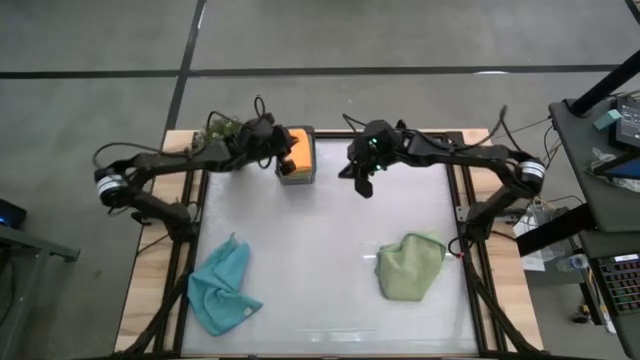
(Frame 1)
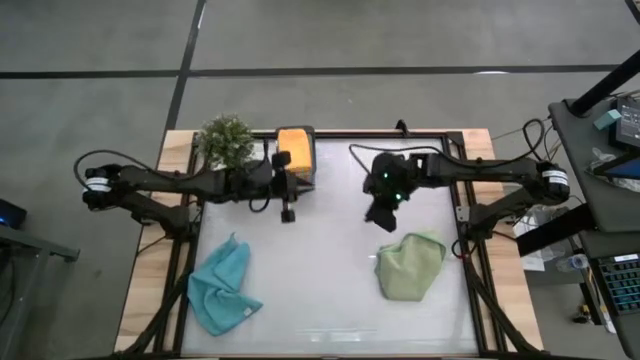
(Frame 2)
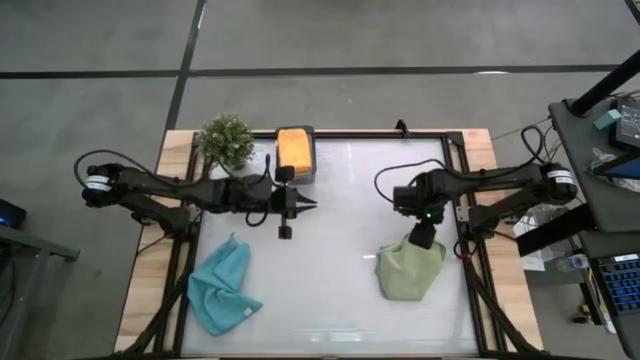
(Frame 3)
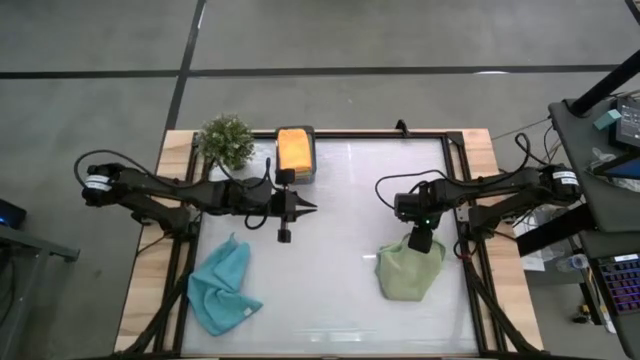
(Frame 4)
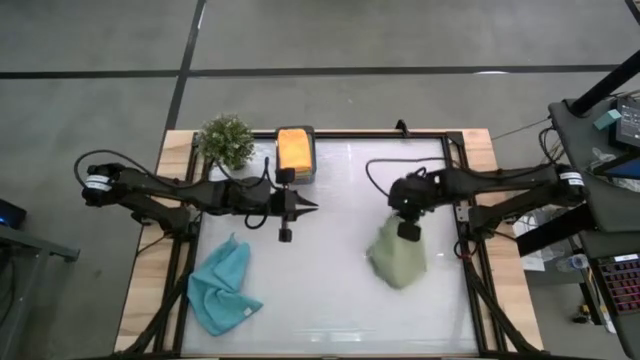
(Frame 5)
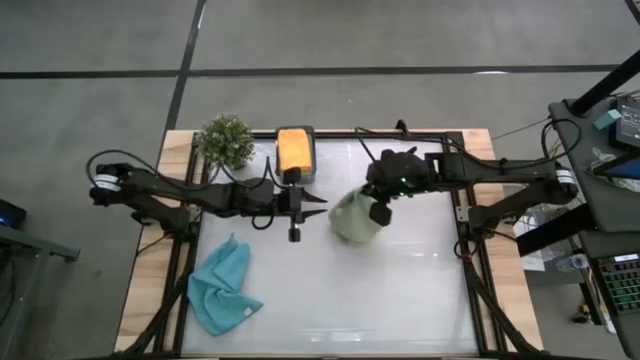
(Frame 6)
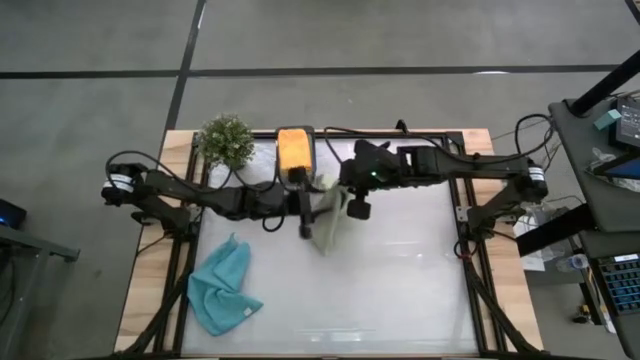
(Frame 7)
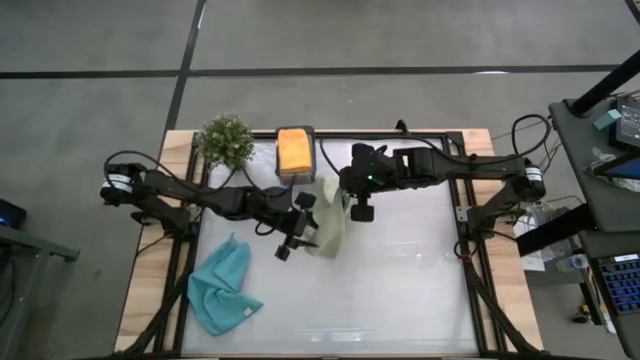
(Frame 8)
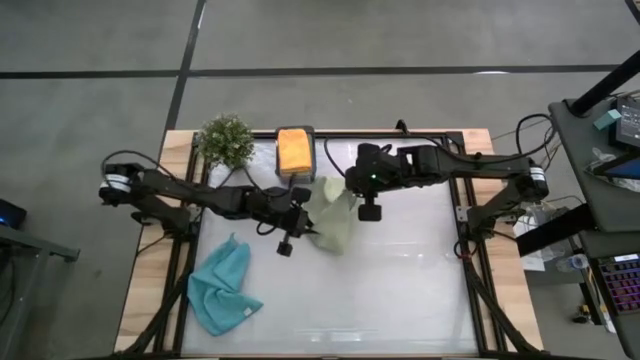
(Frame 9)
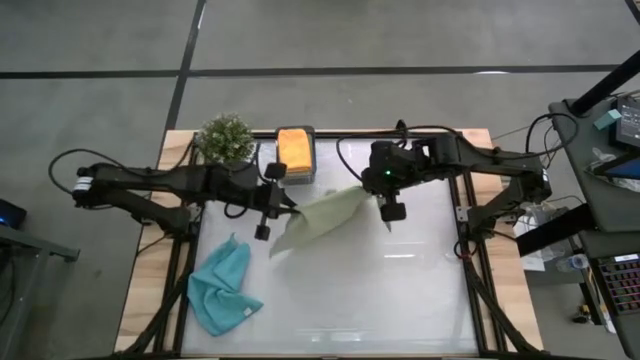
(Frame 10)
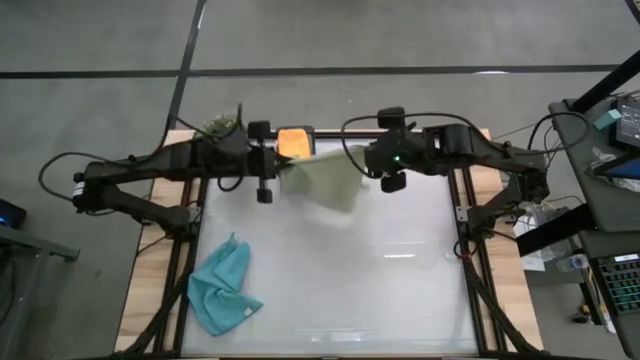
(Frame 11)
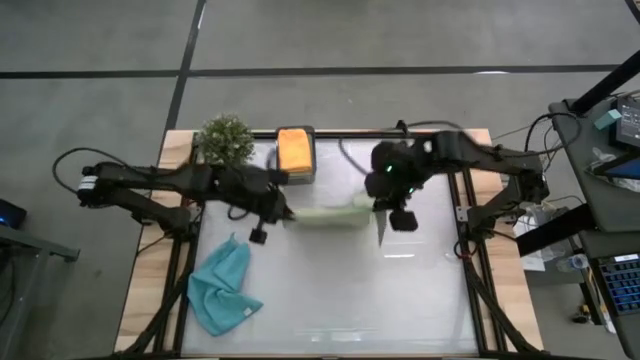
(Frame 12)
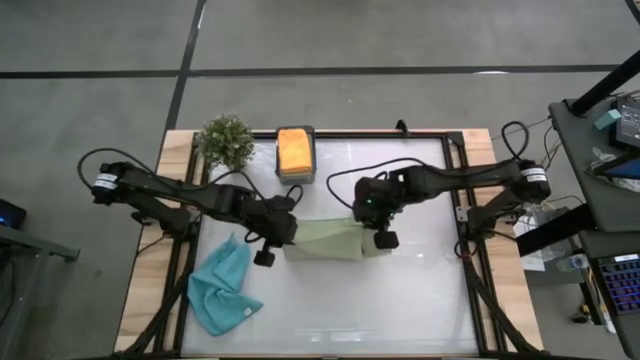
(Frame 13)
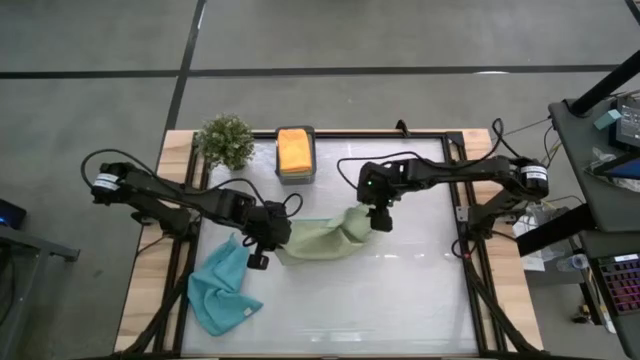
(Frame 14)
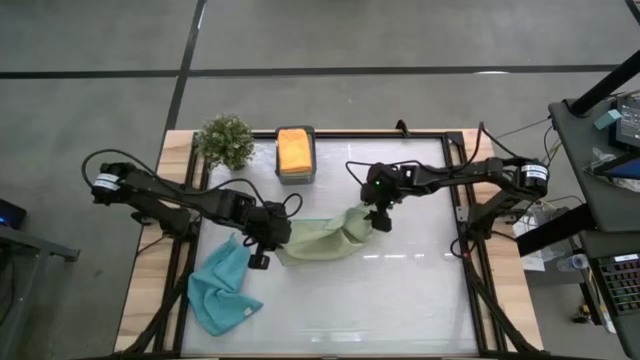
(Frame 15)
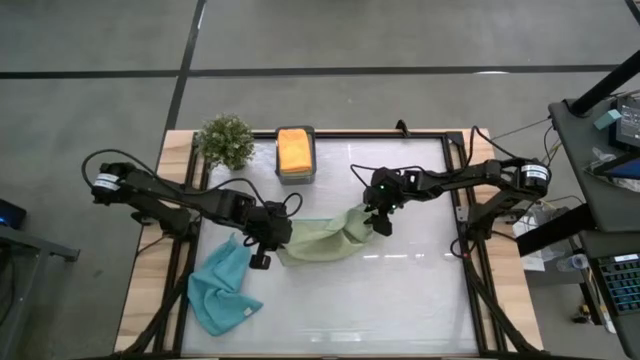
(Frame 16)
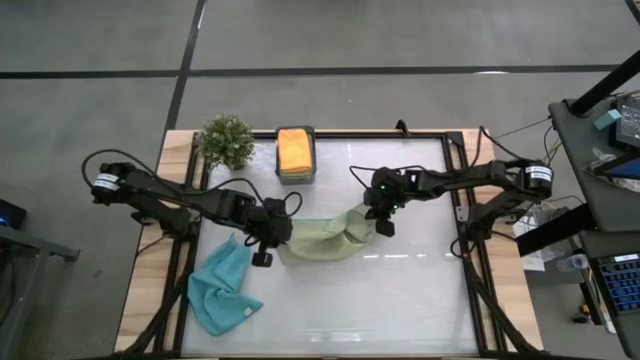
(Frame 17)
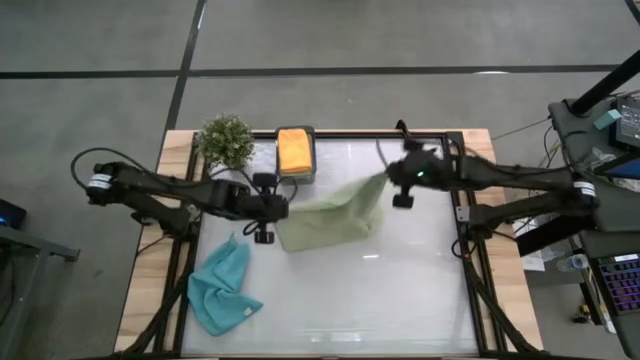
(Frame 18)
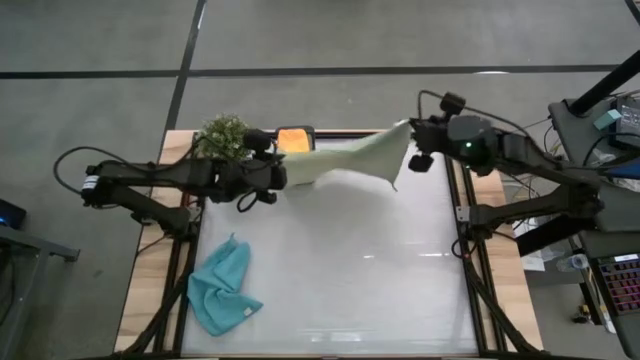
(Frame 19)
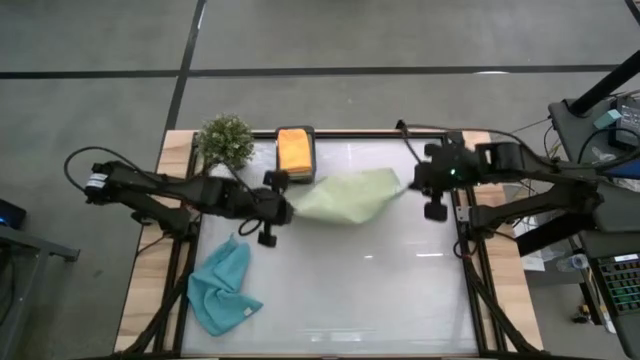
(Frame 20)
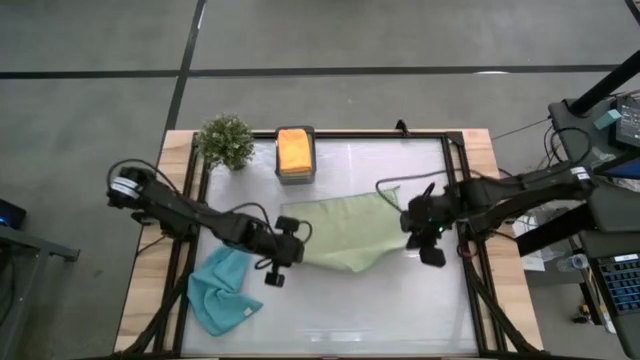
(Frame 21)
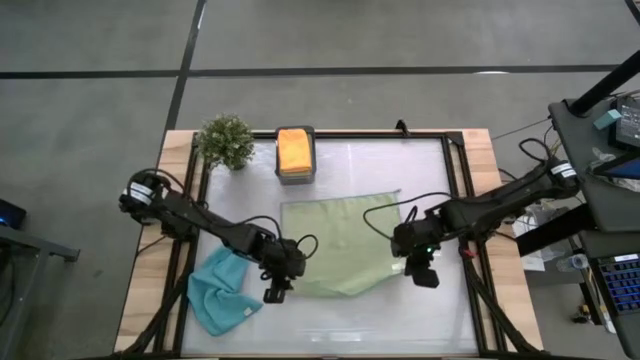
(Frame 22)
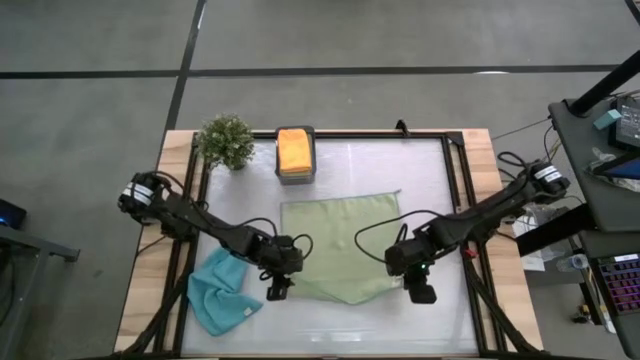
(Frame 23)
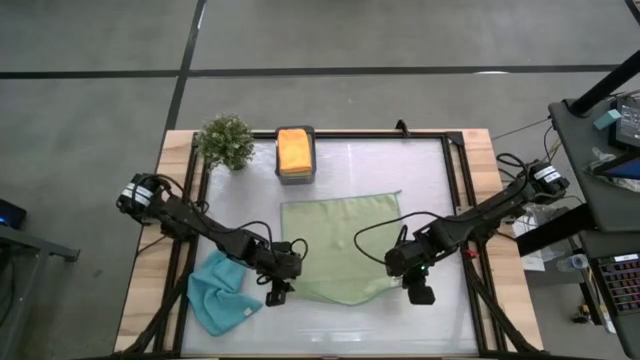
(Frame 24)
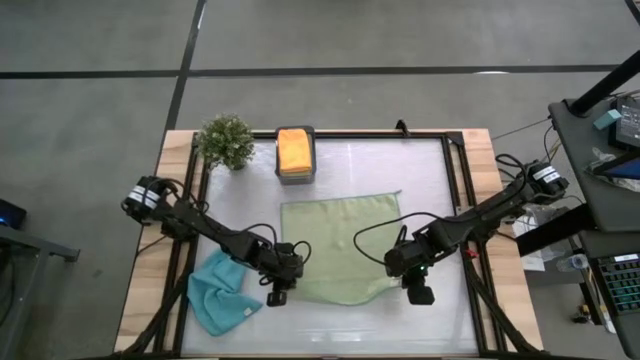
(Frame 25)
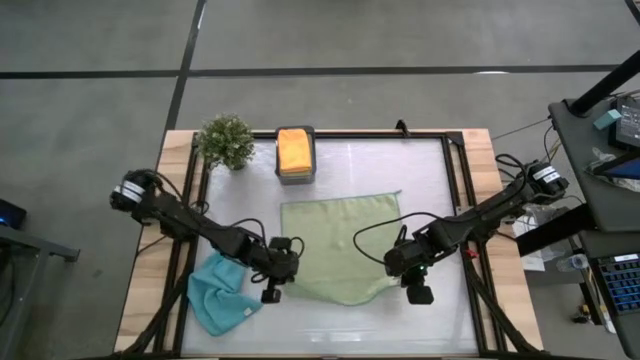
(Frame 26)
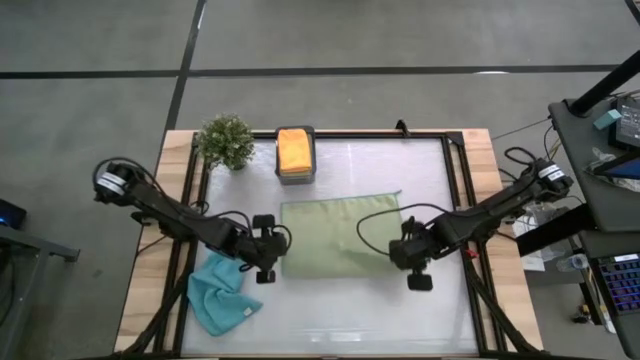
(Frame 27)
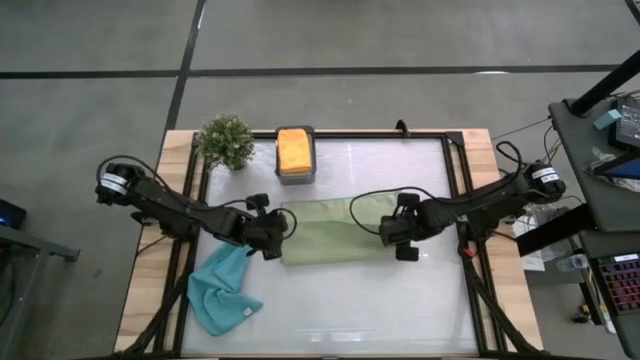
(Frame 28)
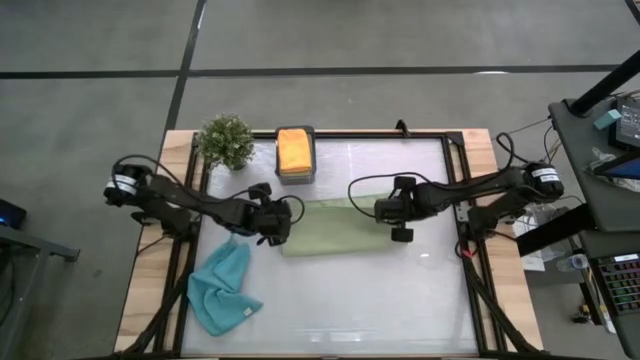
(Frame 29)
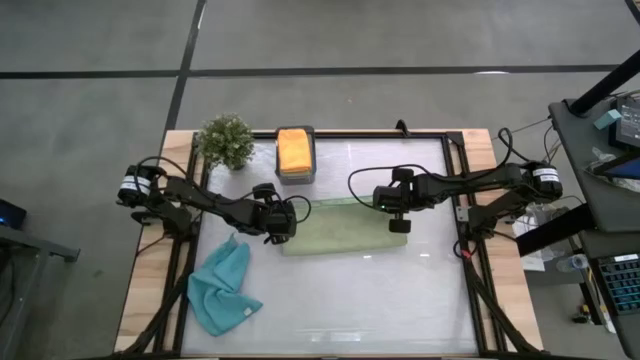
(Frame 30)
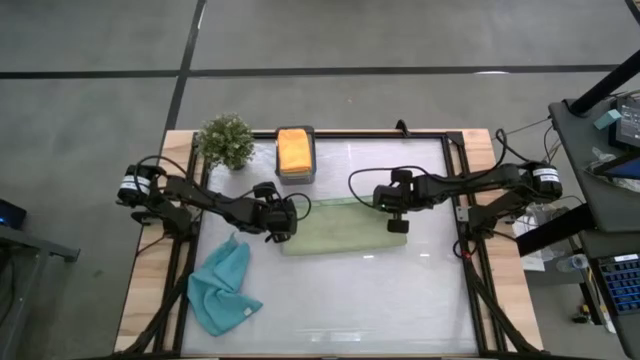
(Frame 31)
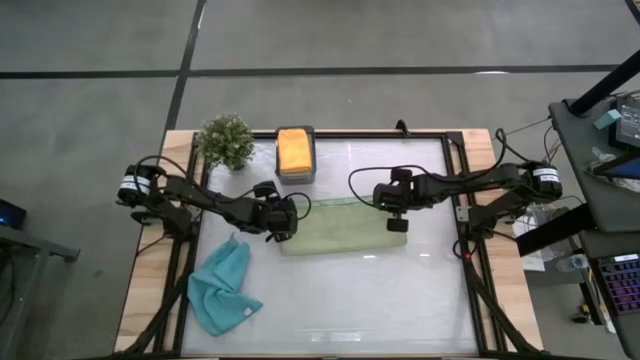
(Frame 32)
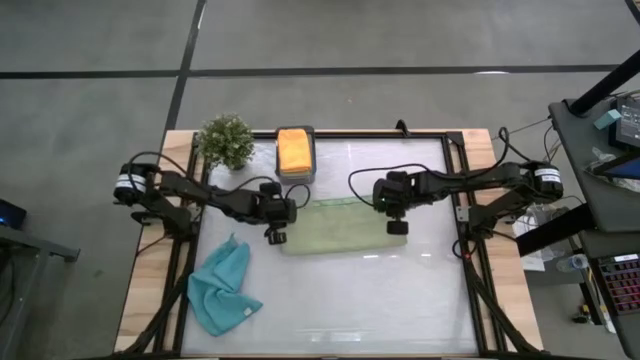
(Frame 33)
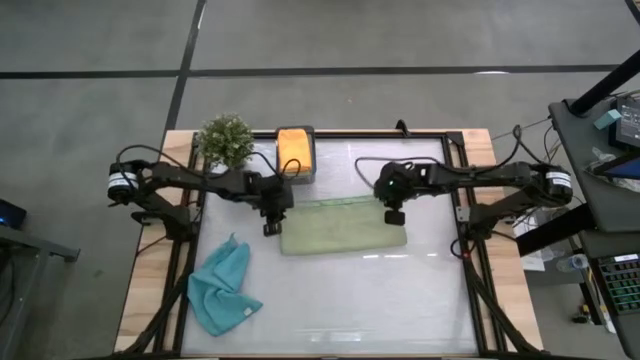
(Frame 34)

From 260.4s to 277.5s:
Task: Fold microfiber towels
Fold the green towel
